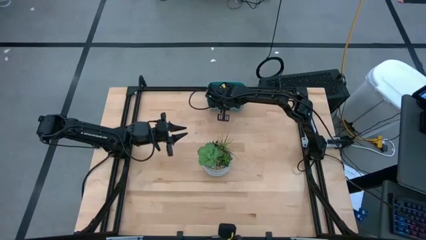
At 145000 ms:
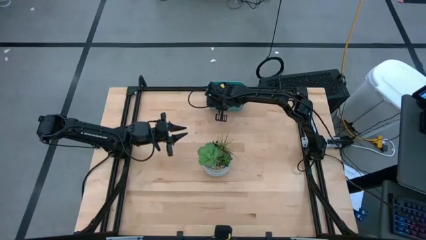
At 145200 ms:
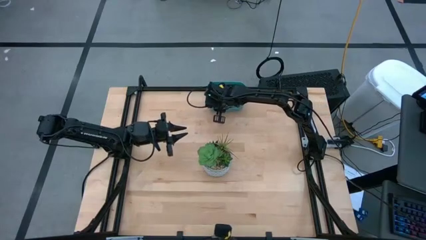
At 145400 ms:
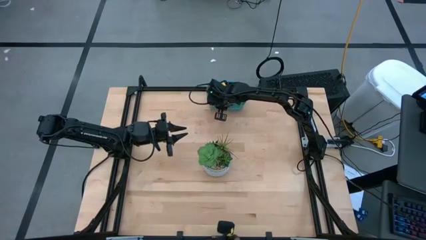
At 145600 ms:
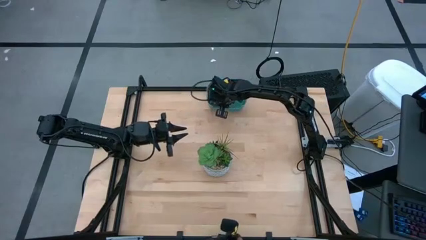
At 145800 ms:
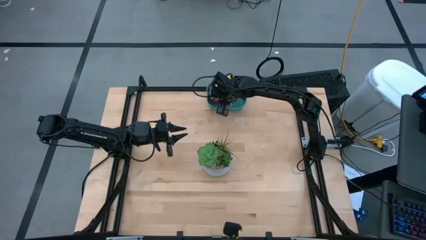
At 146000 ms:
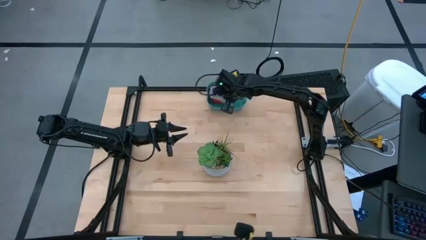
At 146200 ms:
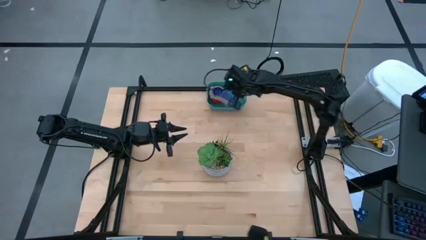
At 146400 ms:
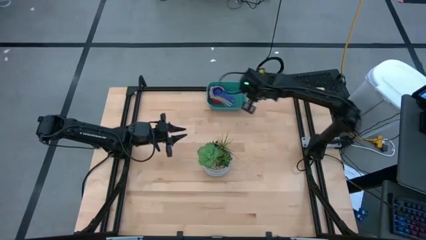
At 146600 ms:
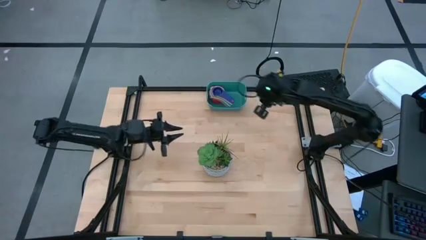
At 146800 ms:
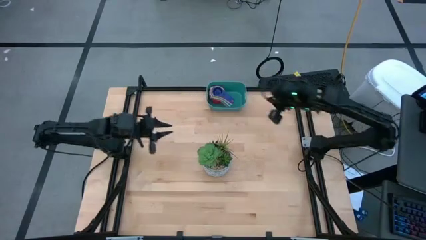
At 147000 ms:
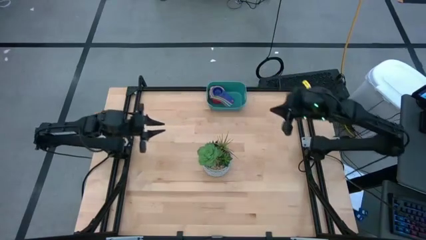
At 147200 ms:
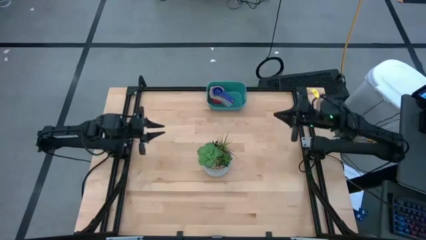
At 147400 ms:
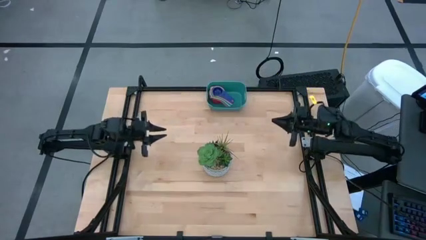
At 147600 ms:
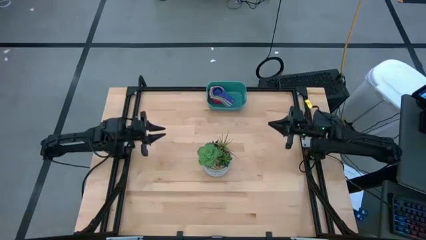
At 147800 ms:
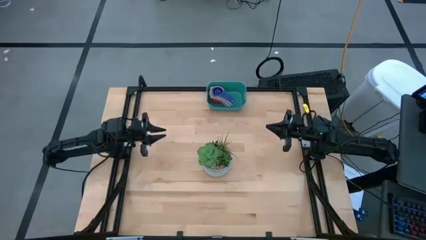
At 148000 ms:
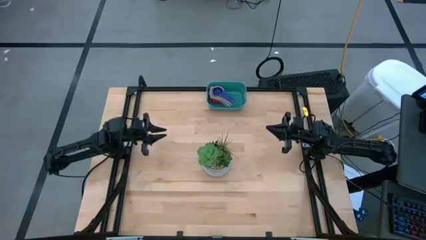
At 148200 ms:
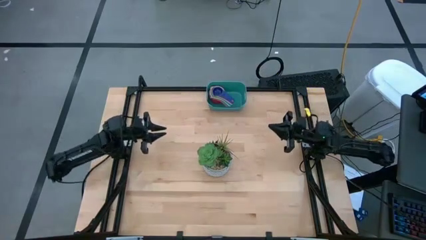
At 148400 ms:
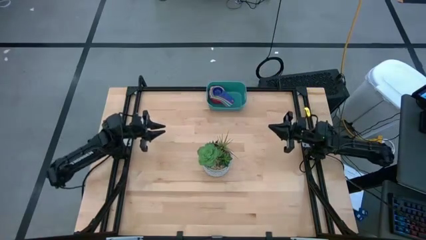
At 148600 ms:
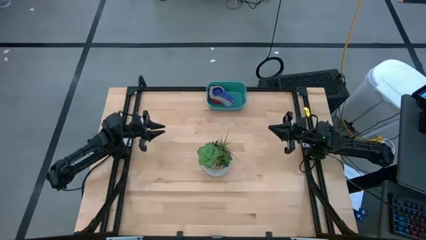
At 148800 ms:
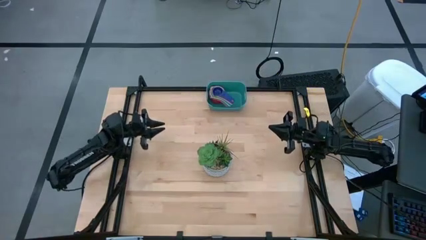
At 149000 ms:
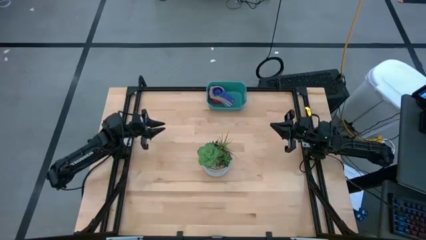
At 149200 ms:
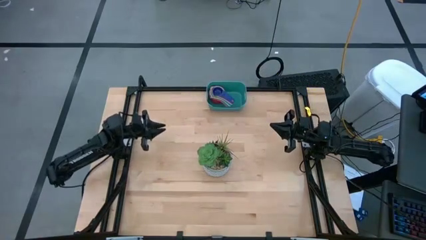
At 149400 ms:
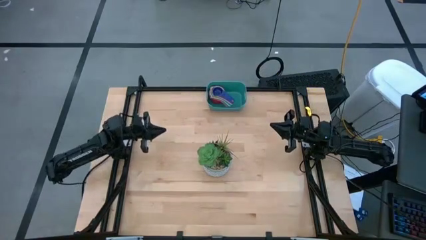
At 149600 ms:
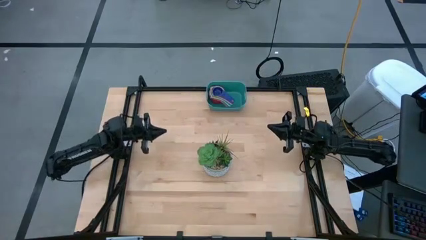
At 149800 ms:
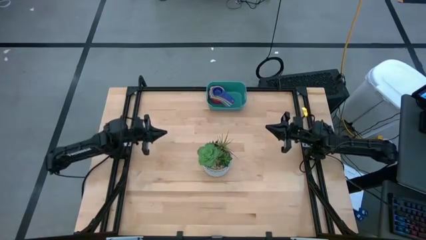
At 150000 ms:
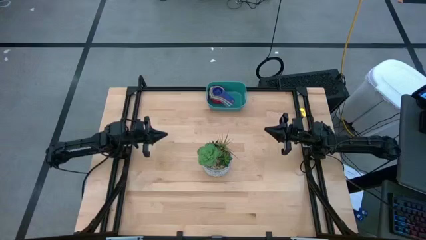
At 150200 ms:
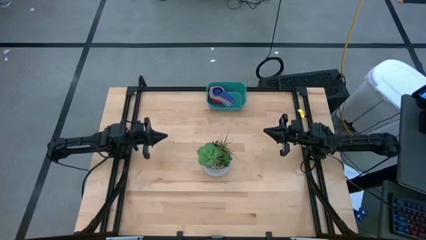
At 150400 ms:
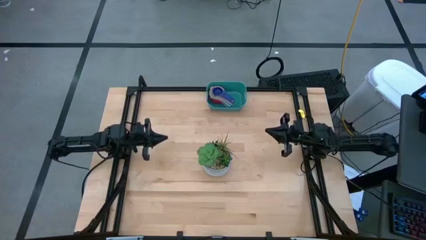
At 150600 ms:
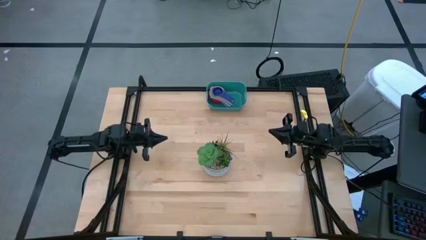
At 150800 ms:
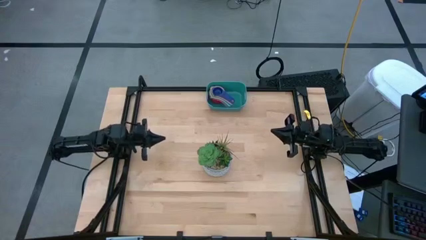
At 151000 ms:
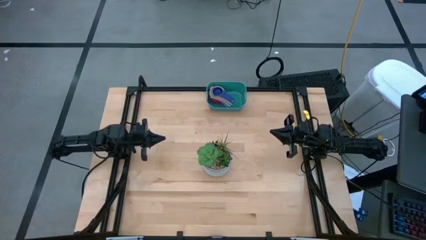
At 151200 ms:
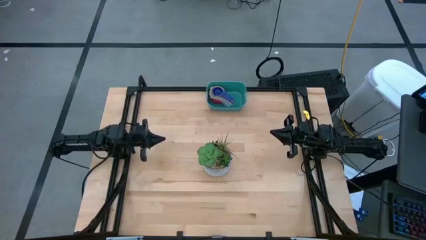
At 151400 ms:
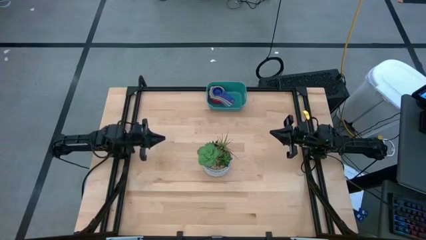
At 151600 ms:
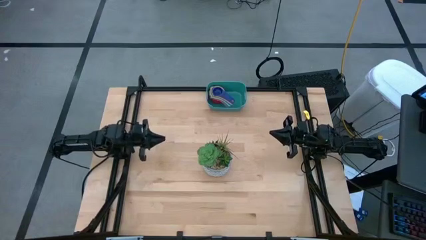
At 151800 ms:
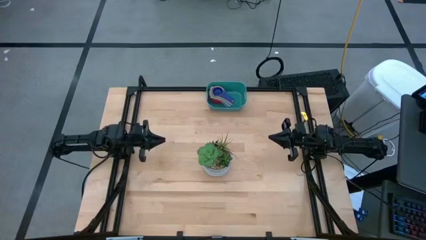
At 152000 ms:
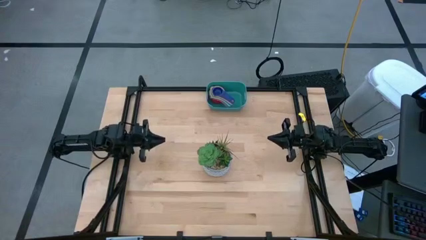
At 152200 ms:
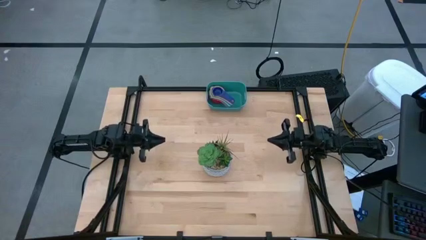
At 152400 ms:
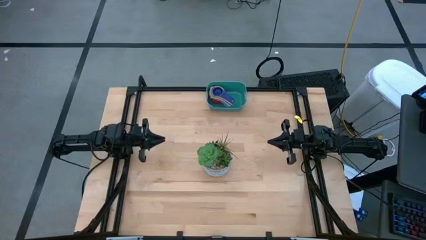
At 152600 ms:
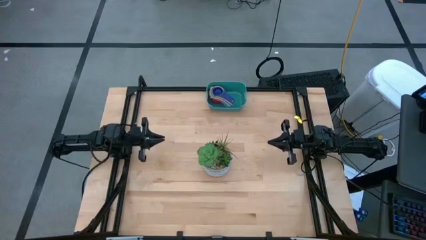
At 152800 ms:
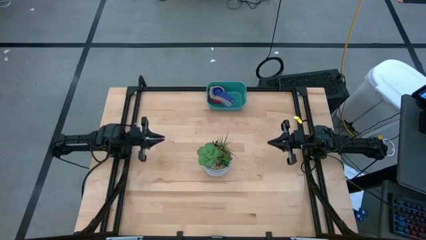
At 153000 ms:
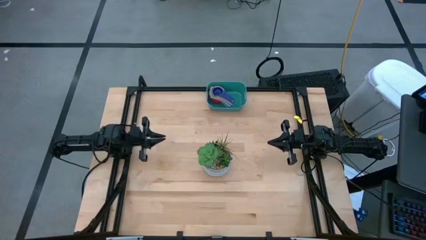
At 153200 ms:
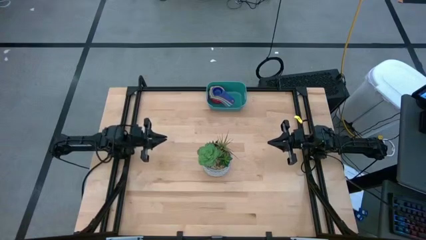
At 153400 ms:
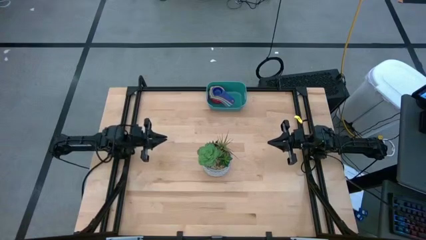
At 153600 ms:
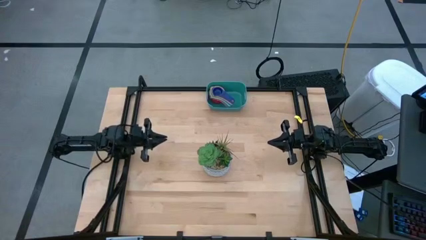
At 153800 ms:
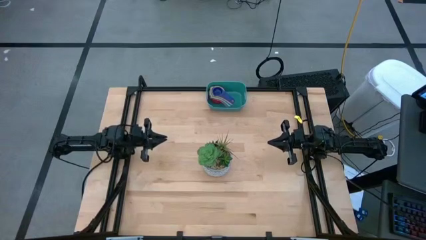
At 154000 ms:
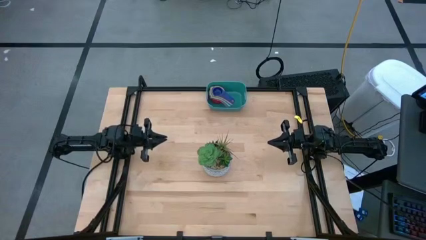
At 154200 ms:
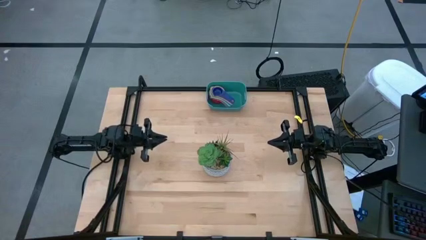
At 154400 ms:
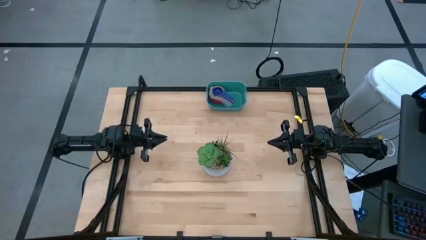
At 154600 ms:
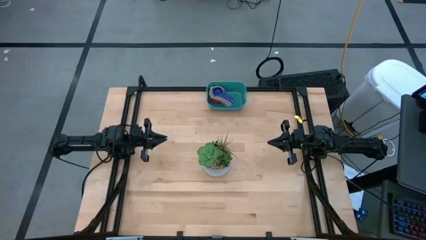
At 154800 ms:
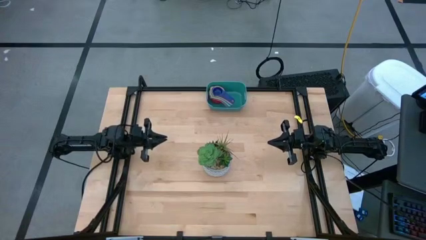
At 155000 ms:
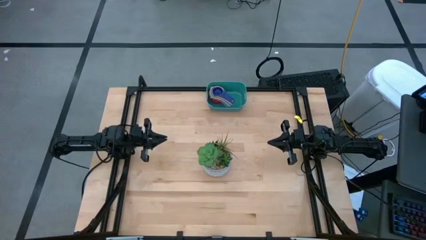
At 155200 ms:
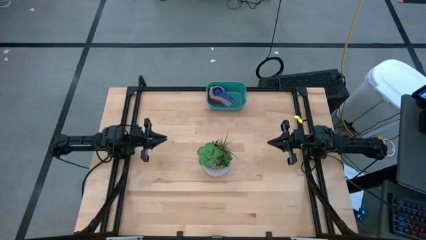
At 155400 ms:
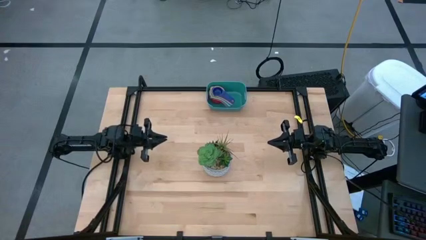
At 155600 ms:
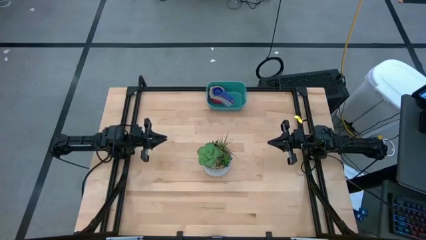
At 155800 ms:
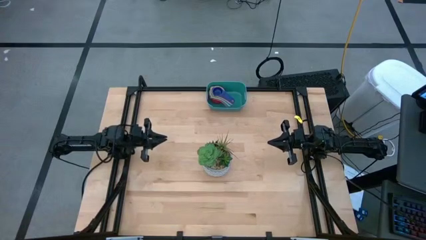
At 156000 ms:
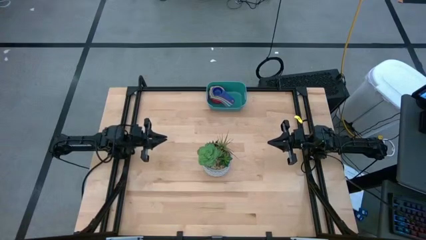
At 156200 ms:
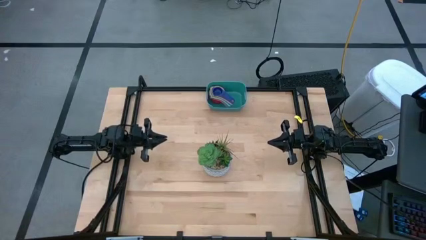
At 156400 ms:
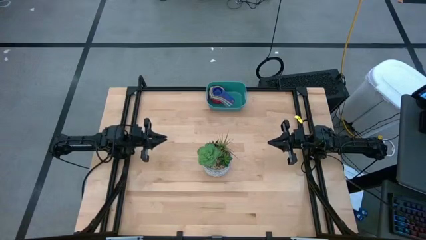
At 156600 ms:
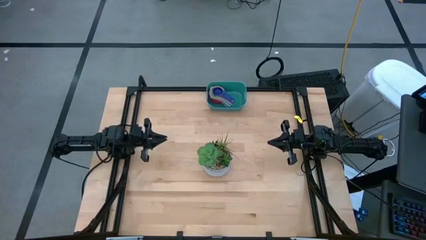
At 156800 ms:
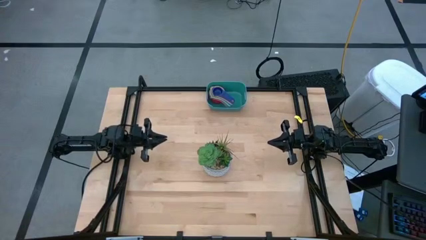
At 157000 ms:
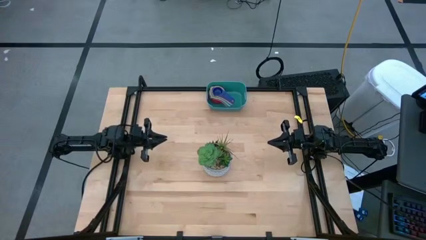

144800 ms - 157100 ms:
Task: Nest measuring cups in basket
Return to Home Position

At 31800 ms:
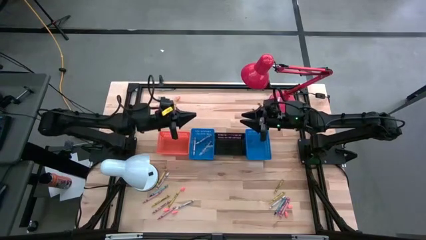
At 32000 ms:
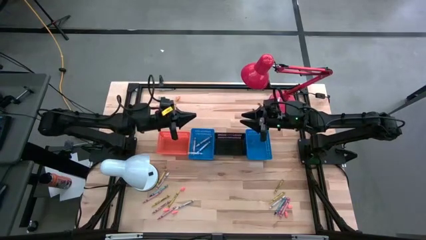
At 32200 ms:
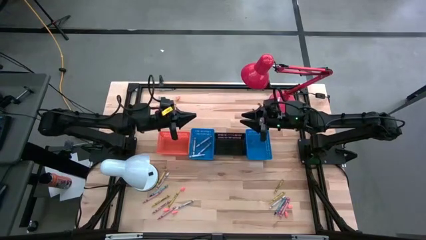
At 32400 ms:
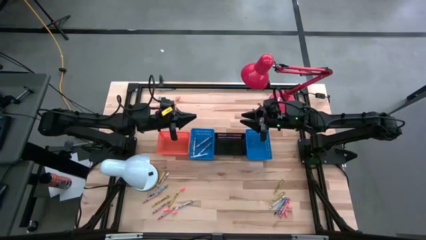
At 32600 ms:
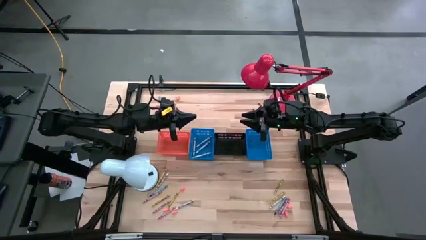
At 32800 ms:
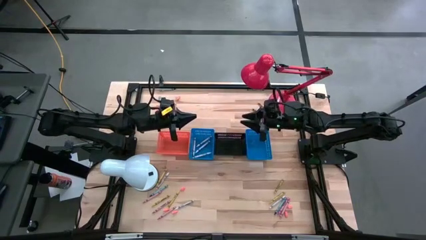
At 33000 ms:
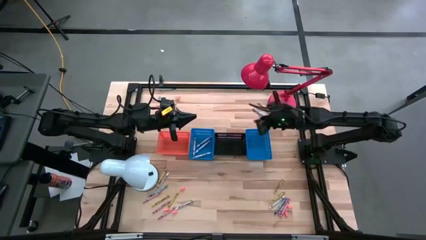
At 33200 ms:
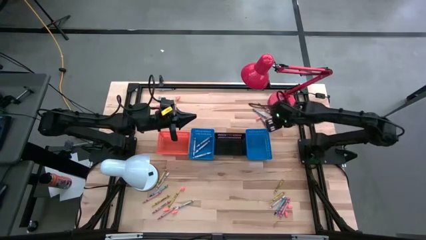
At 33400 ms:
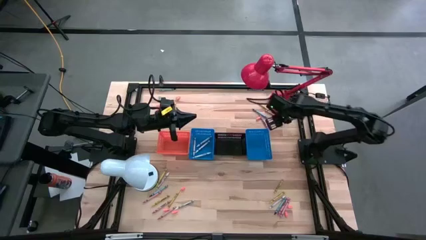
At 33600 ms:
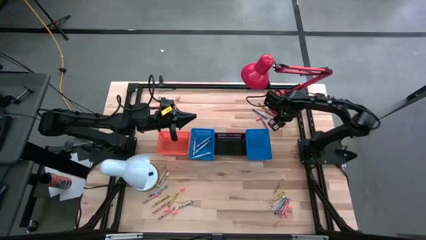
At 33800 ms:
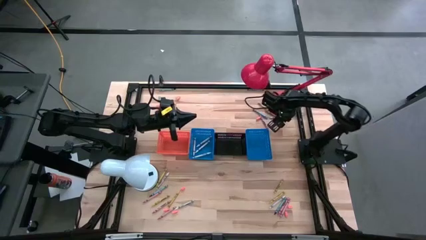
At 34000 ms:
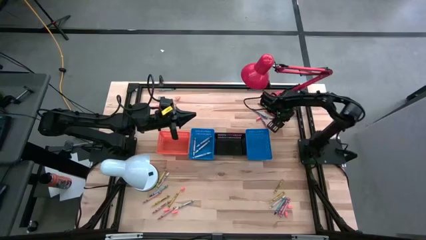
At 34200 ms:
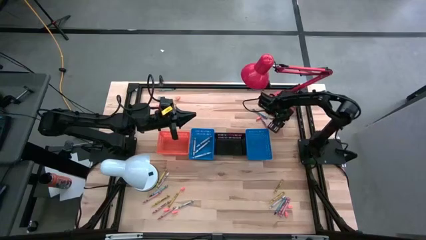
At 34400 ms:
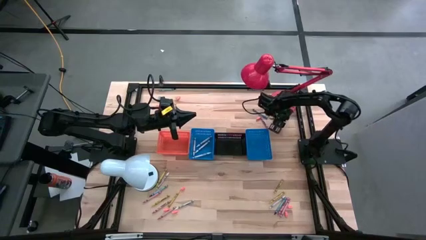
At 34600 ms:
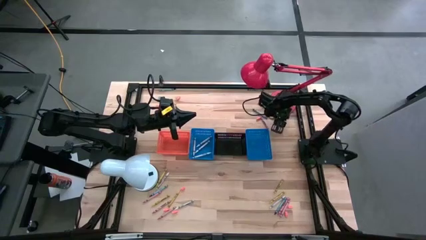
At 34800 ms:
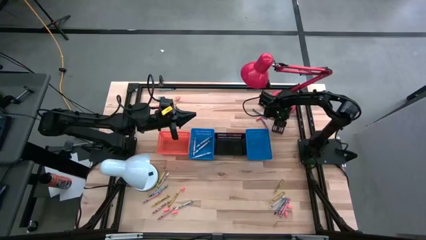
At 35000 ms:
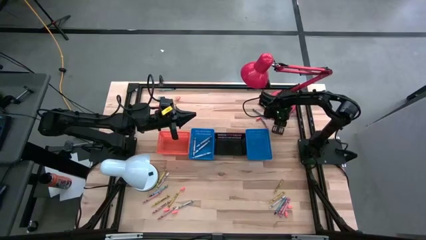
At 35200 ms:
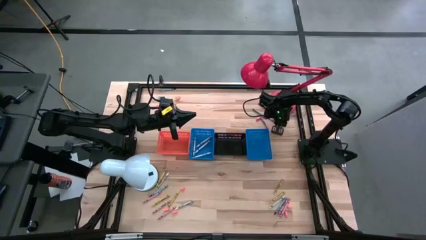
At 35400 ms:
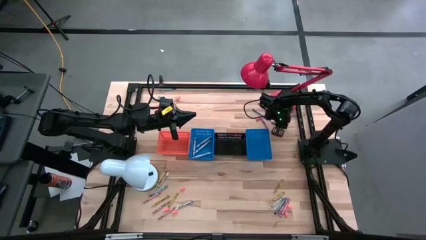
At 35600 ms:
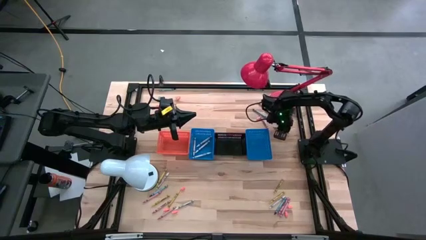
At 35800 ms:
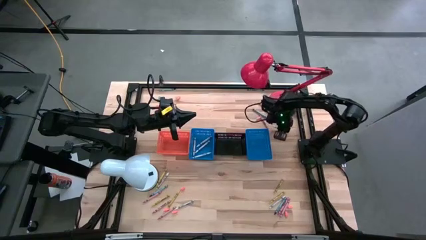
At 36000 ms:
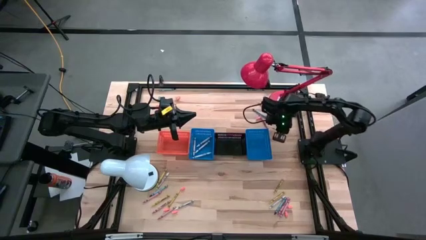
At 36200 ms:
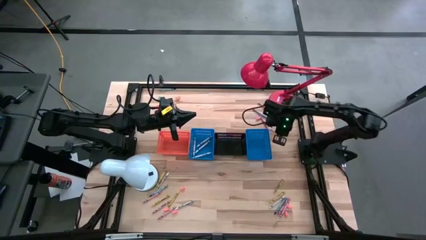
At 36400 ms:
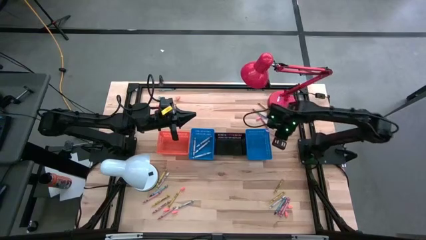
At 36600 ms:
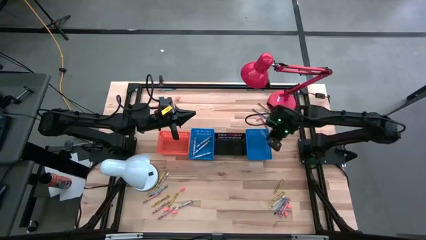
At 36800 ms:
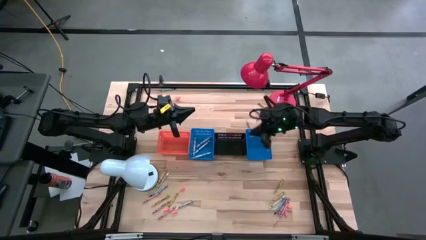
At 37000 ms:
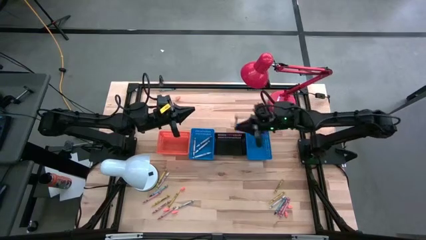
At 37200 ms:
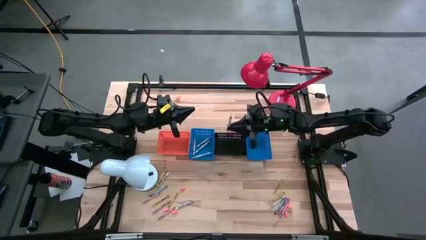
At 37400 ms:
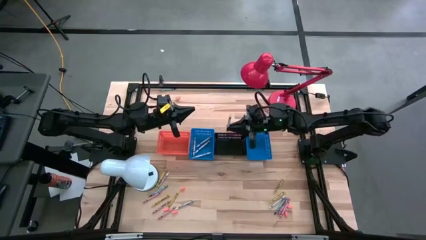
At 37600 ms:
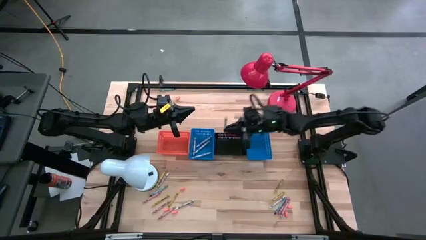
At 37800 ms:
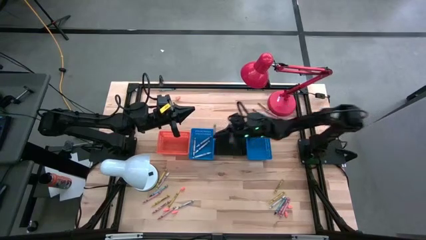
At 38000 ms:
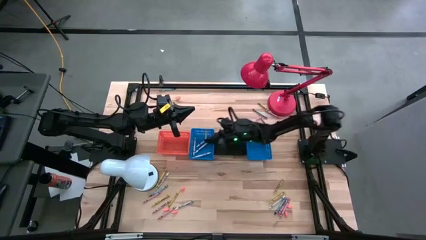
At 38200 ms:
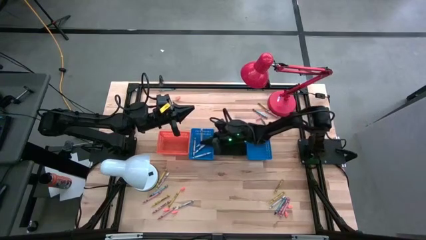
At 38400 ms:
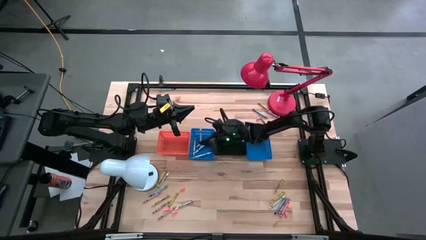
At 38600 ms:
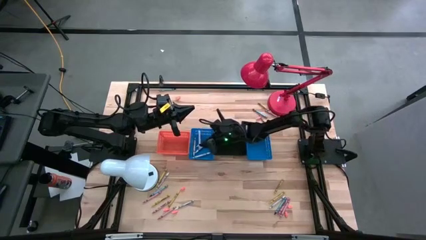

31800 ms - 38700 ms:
Task: Sort crayons
Put the white crayon into the left blue bin
